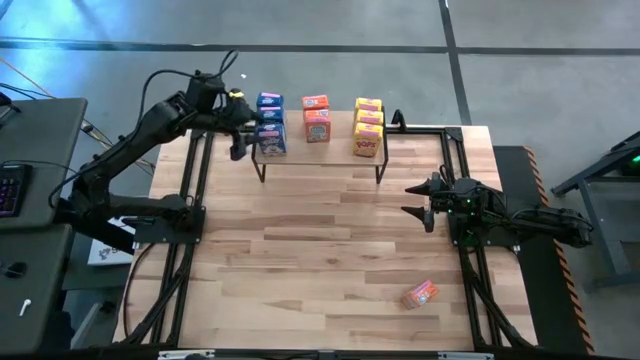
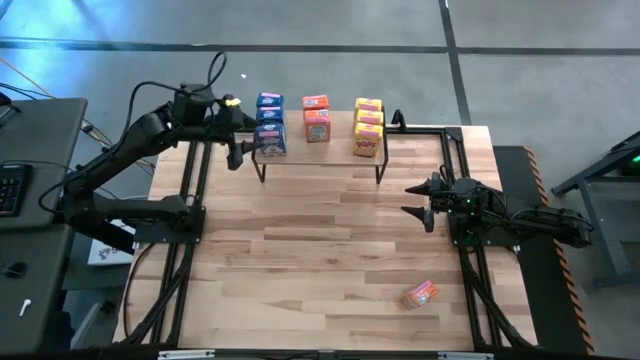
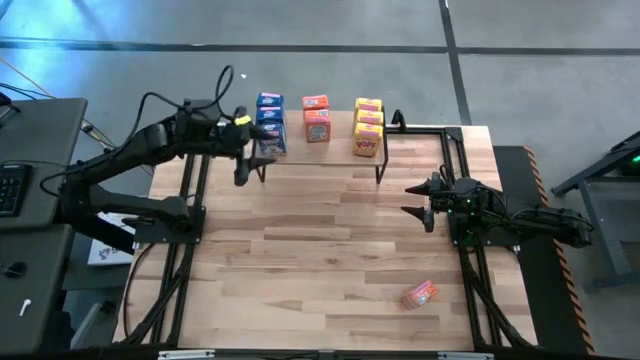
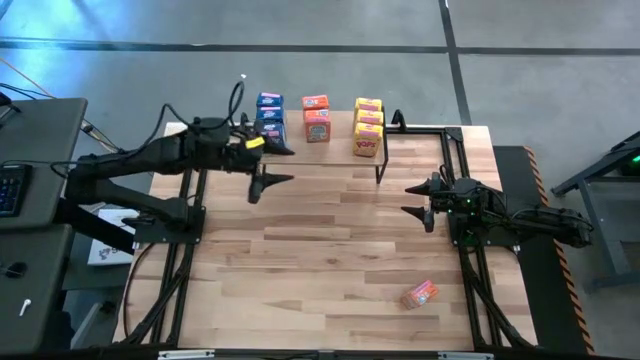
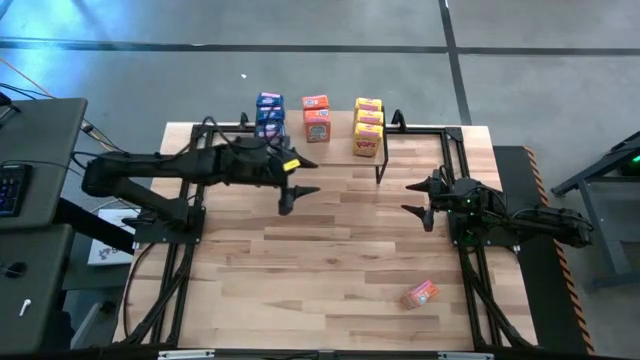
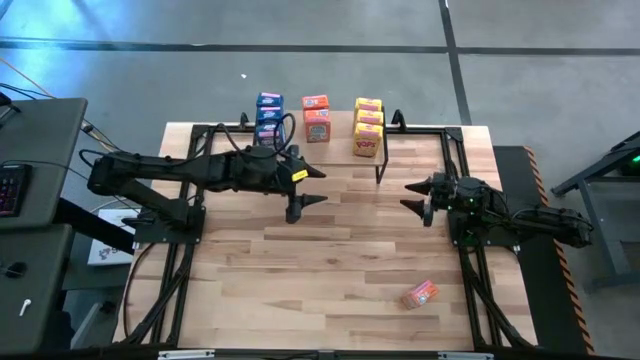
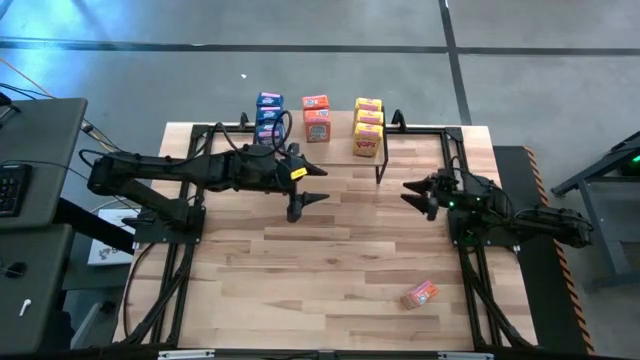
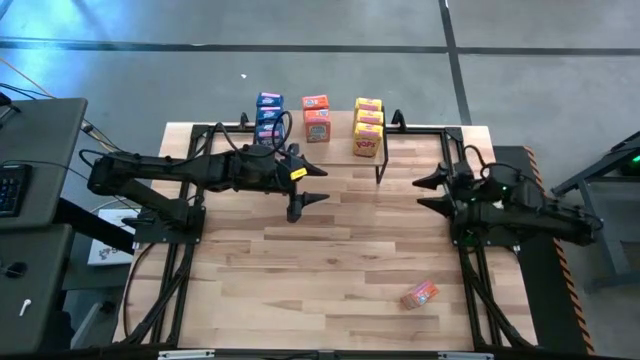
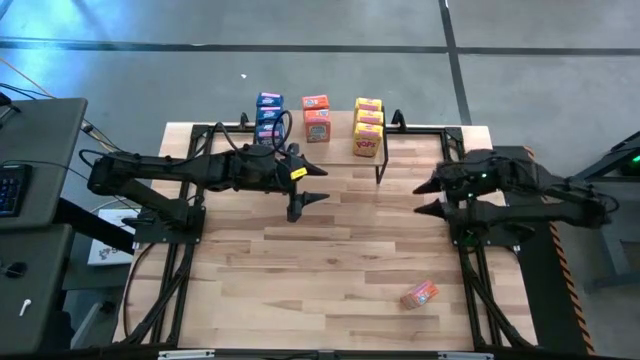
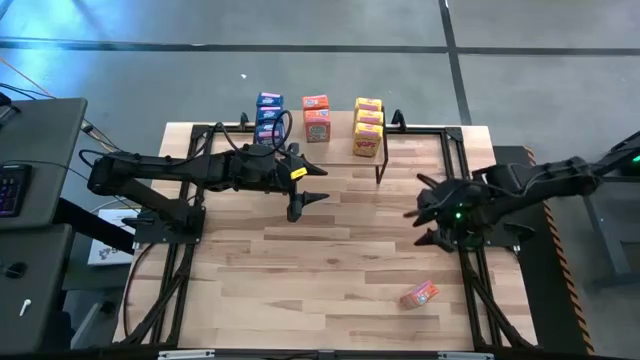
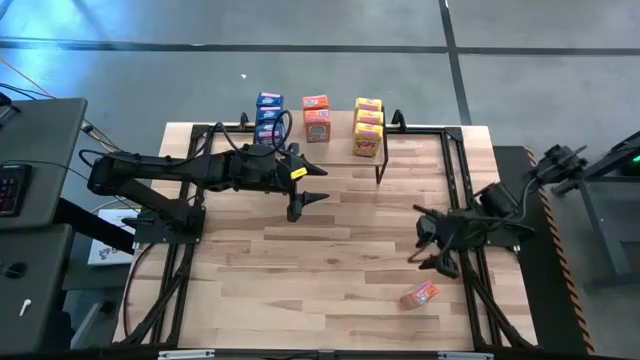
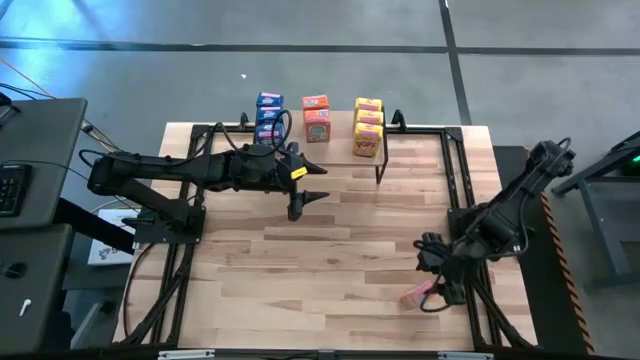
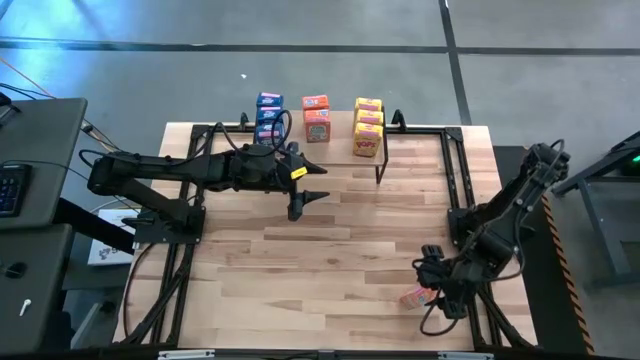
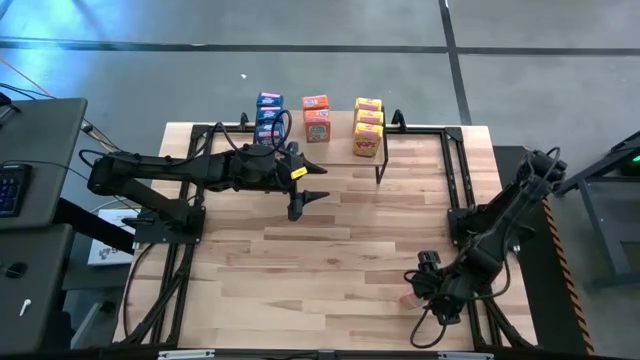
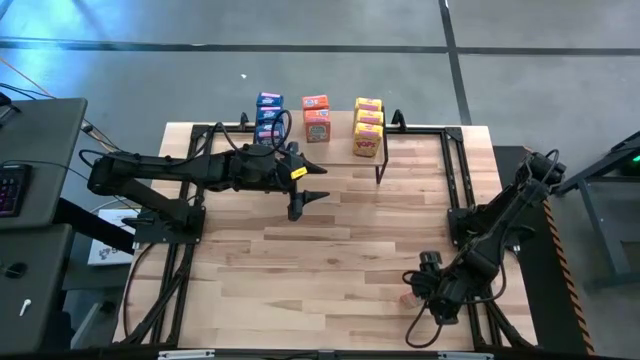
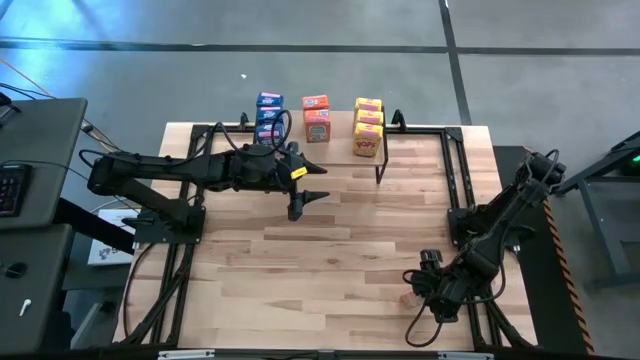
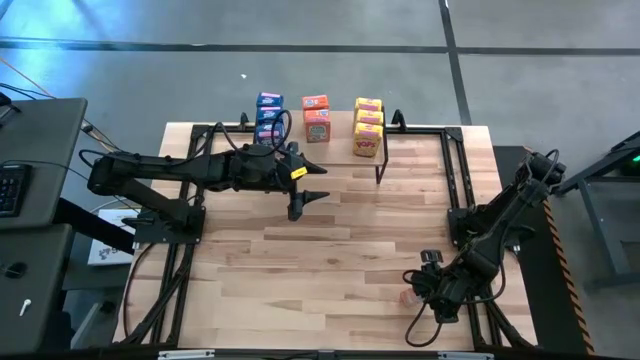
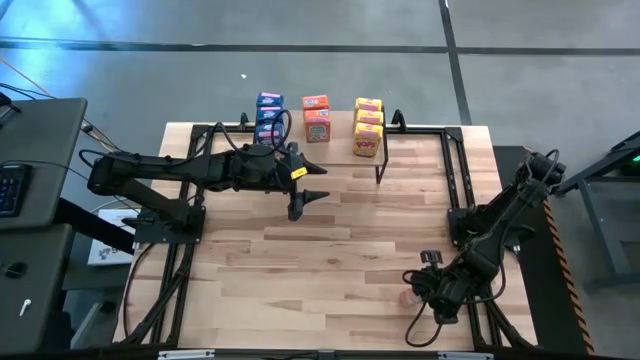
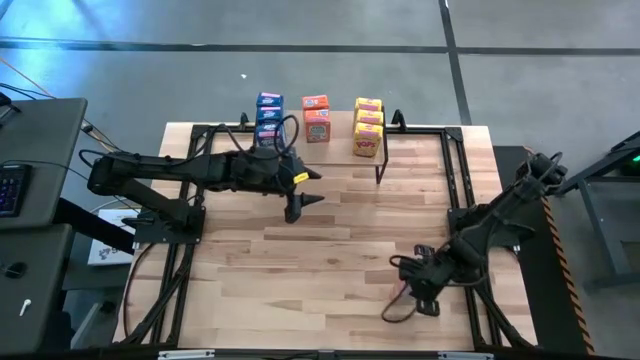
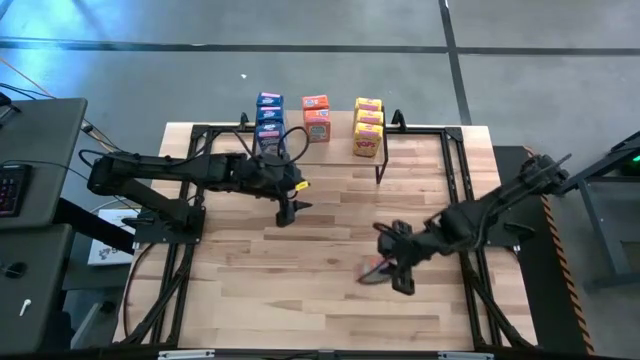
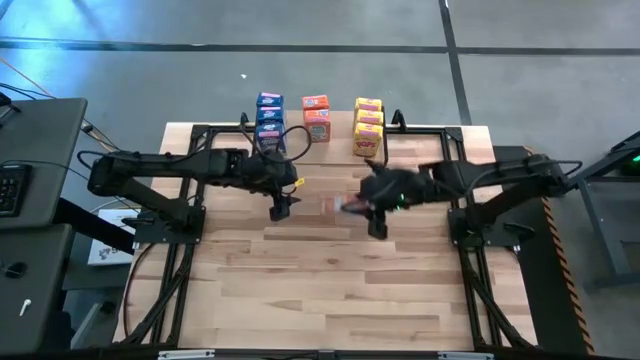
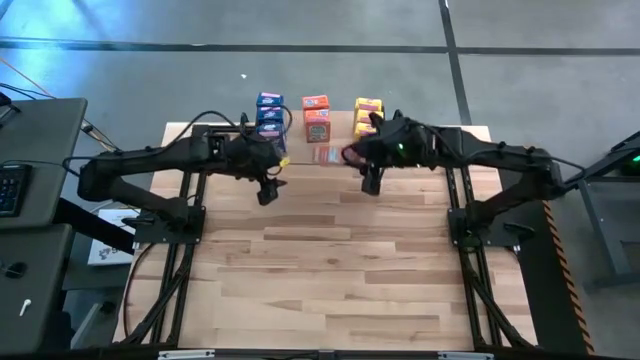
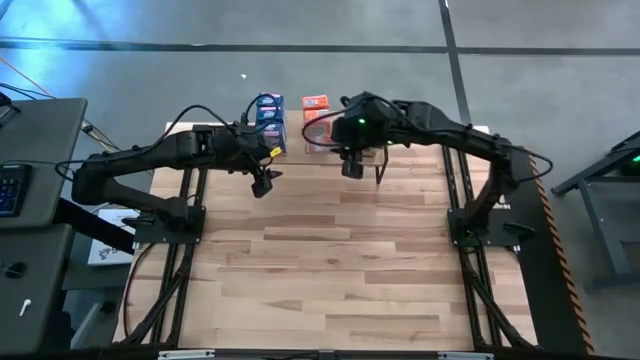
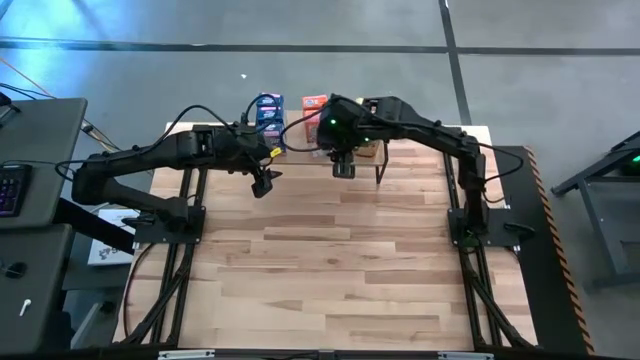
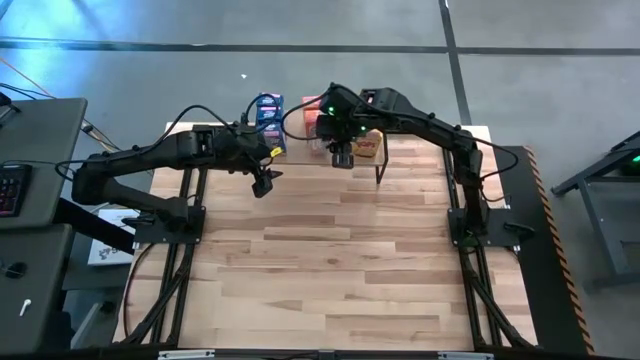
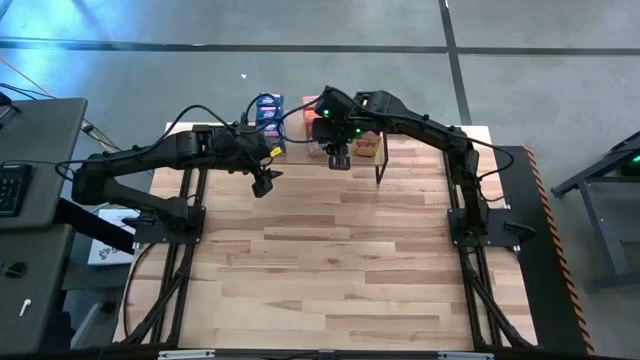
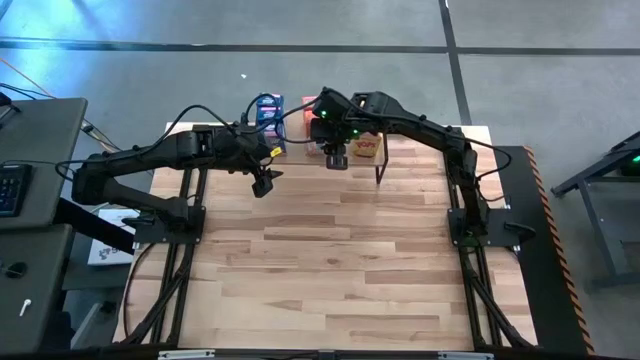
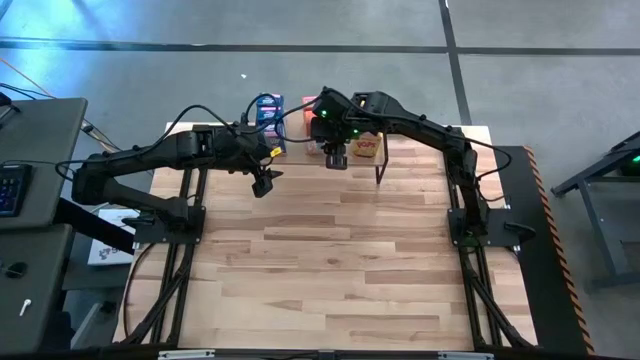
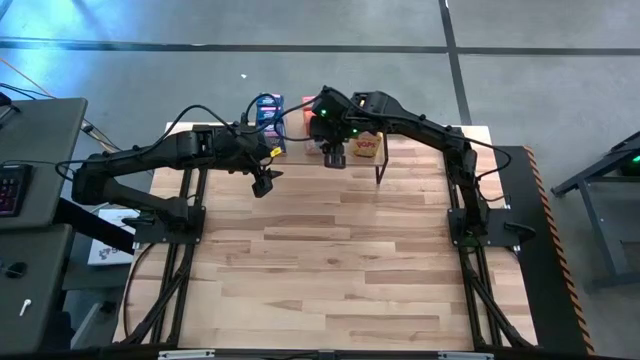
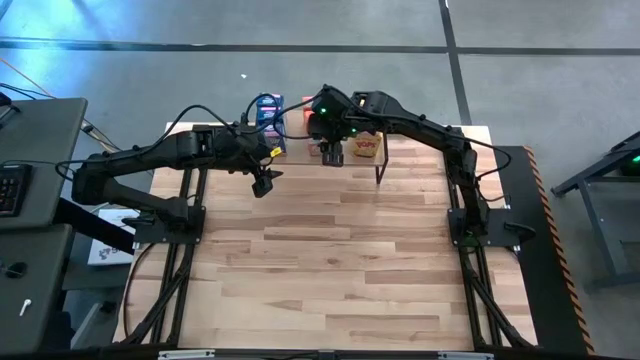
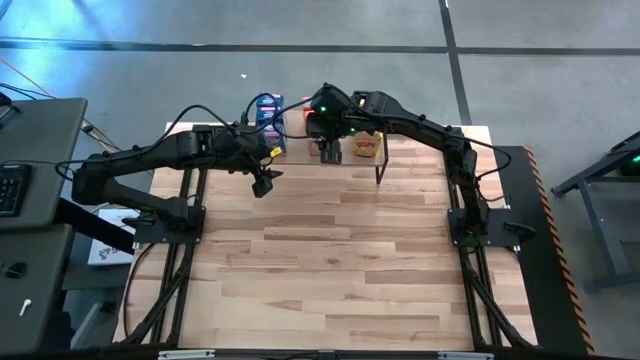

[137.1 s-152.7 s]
Task: Stack cereal on shelf
Put the orange cereal on the shelf aligned with the other orange cereal boxes
